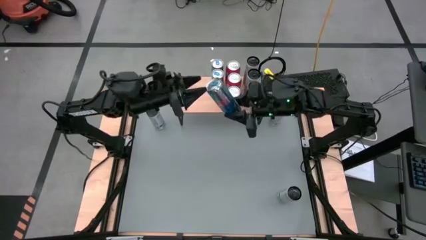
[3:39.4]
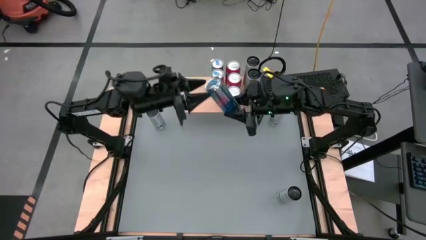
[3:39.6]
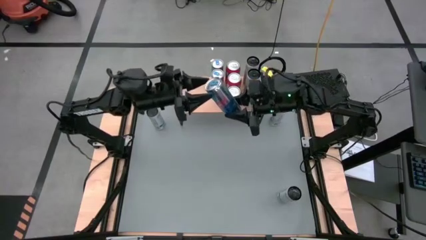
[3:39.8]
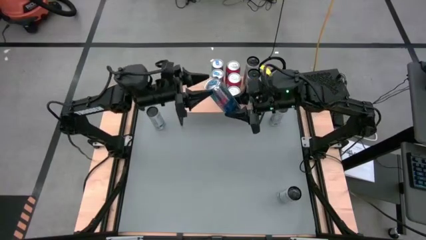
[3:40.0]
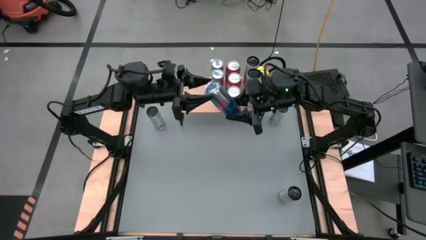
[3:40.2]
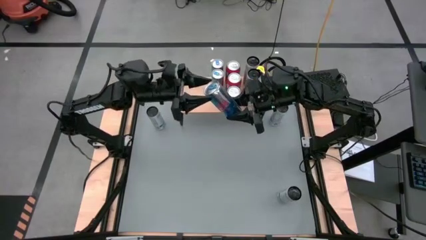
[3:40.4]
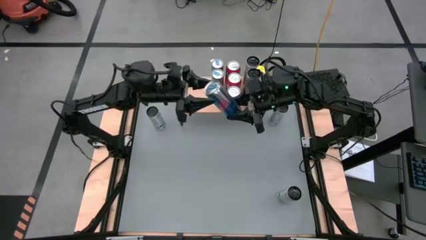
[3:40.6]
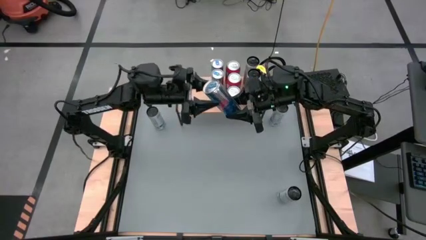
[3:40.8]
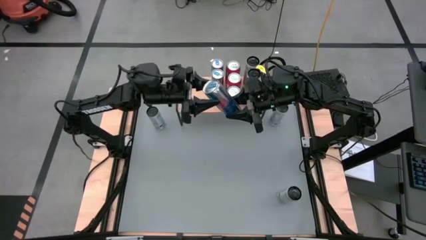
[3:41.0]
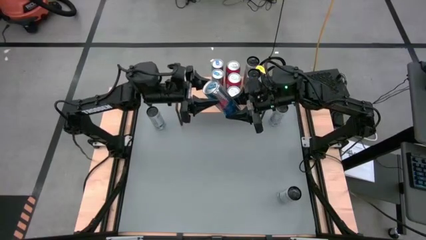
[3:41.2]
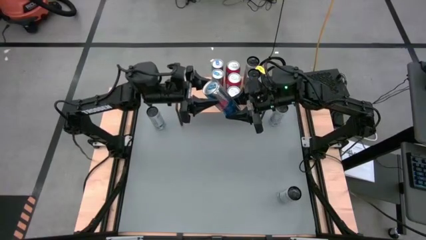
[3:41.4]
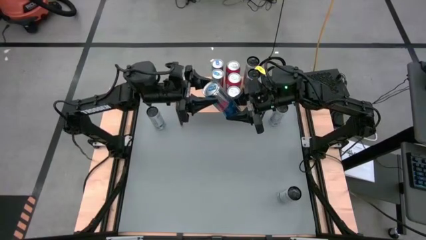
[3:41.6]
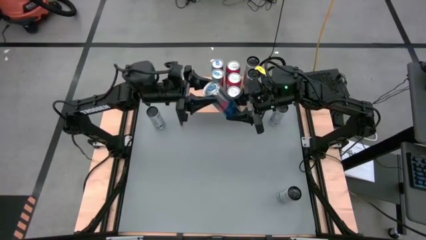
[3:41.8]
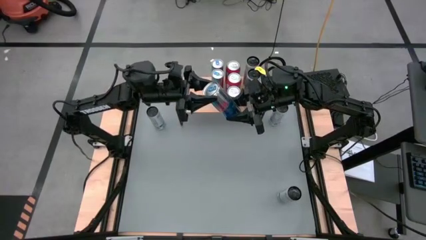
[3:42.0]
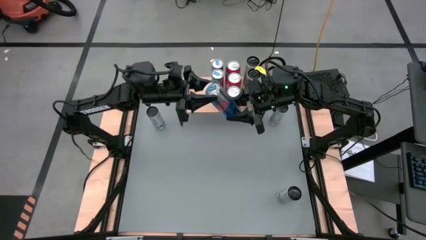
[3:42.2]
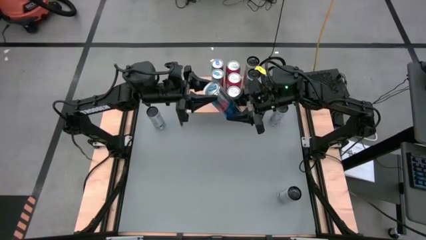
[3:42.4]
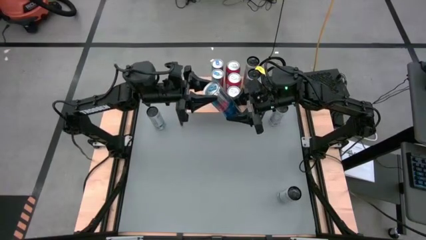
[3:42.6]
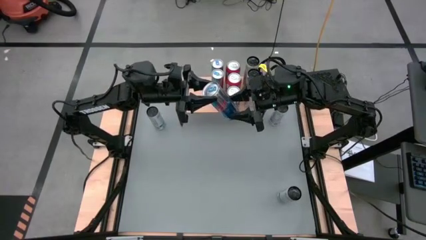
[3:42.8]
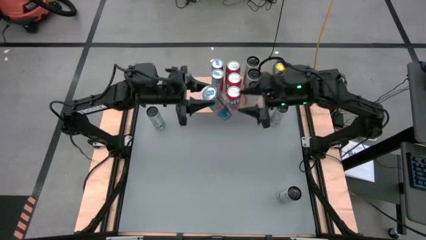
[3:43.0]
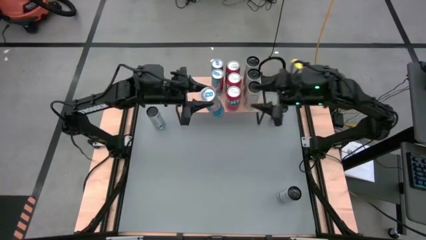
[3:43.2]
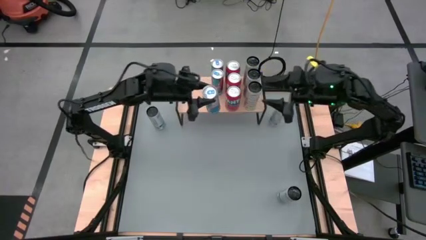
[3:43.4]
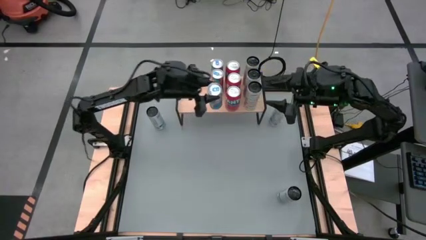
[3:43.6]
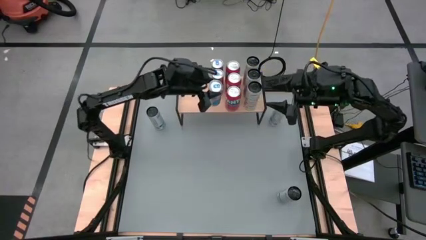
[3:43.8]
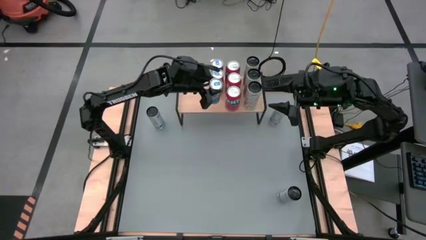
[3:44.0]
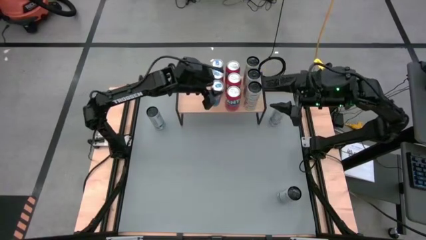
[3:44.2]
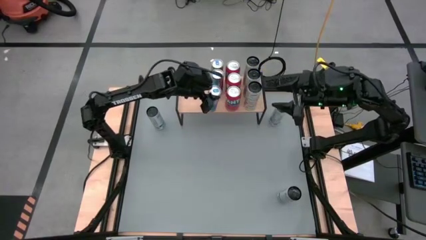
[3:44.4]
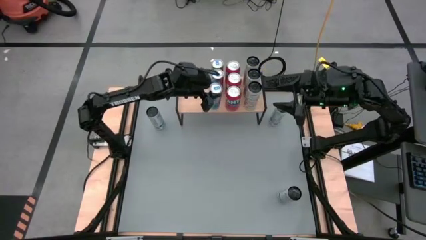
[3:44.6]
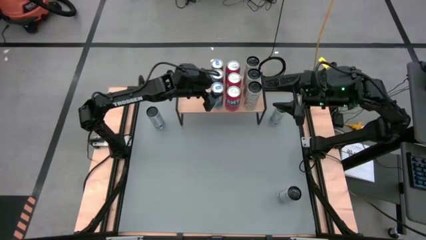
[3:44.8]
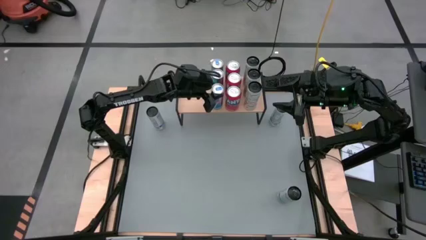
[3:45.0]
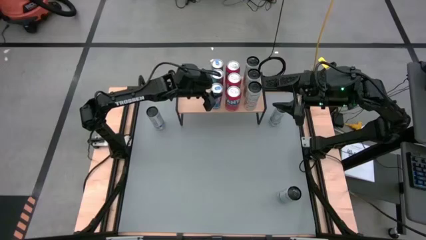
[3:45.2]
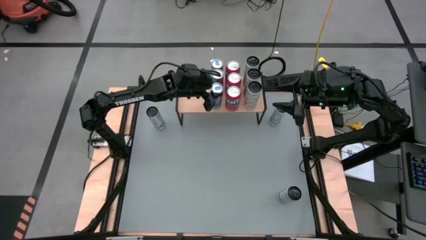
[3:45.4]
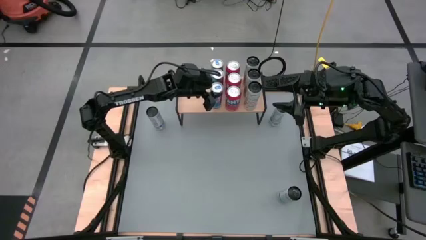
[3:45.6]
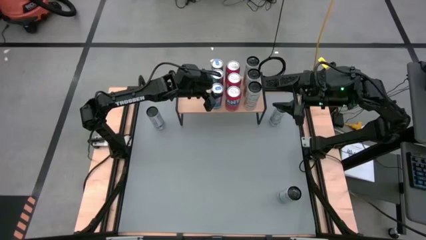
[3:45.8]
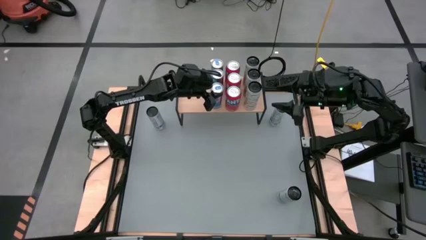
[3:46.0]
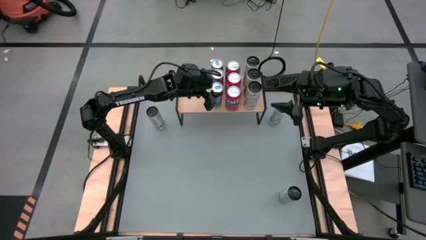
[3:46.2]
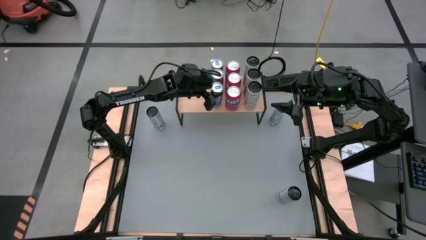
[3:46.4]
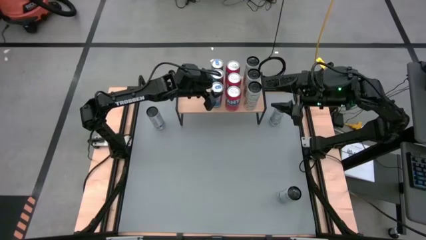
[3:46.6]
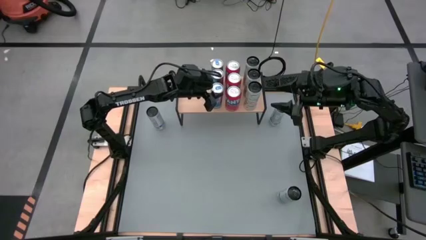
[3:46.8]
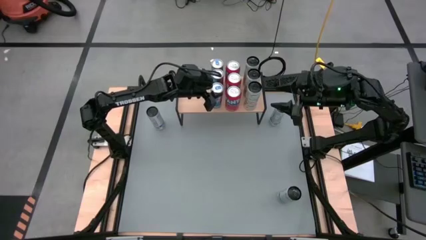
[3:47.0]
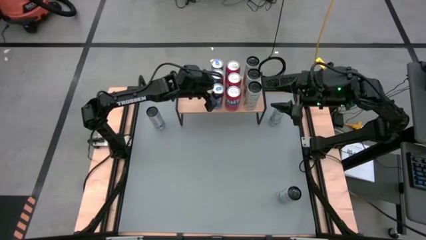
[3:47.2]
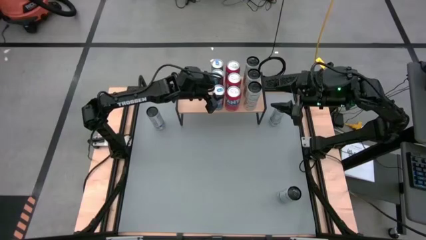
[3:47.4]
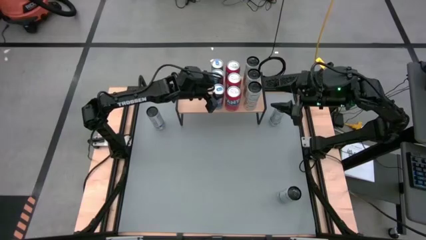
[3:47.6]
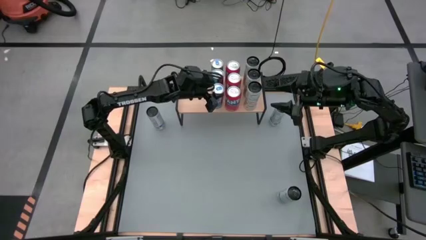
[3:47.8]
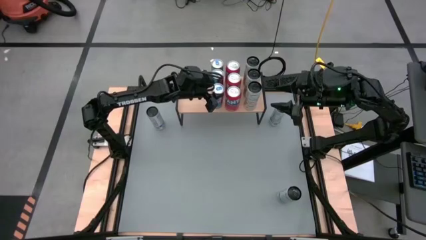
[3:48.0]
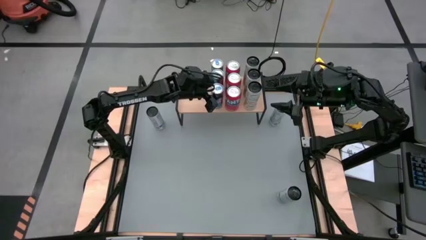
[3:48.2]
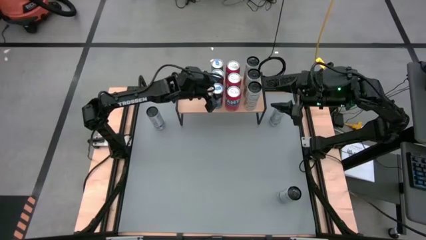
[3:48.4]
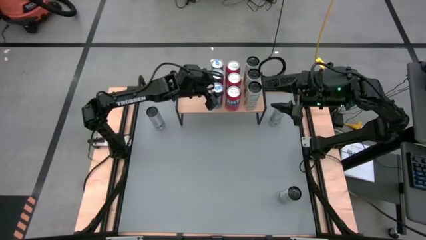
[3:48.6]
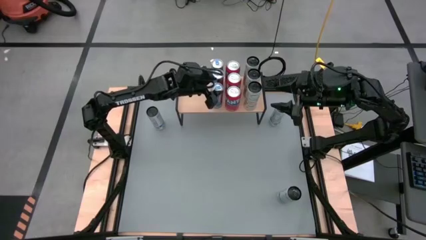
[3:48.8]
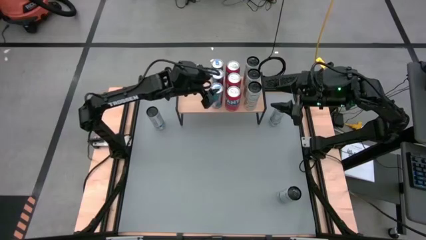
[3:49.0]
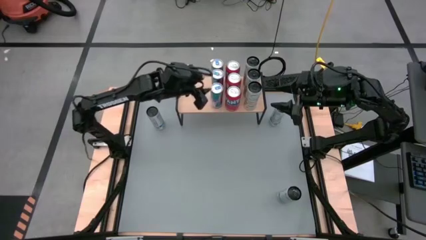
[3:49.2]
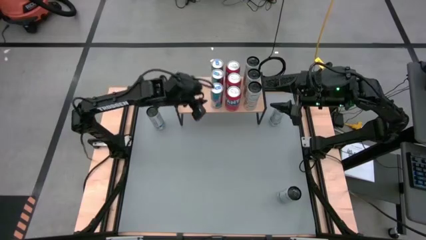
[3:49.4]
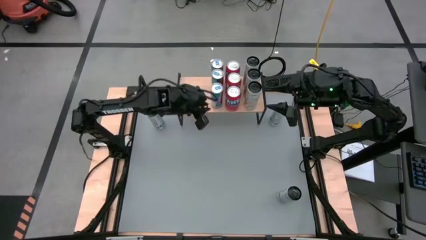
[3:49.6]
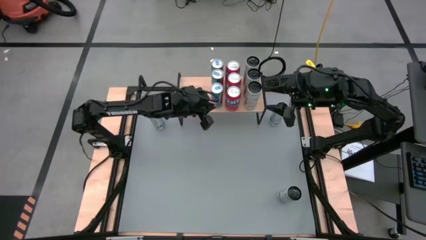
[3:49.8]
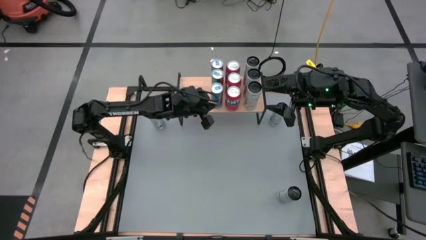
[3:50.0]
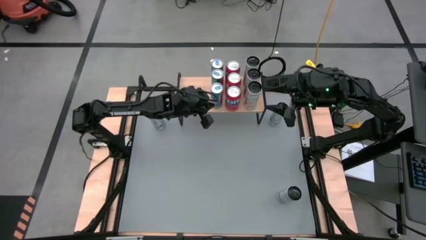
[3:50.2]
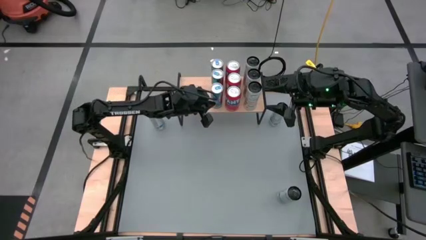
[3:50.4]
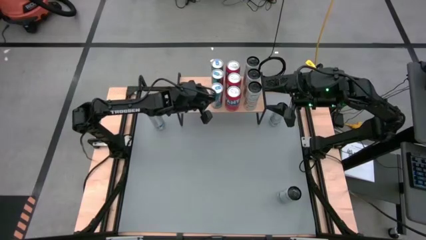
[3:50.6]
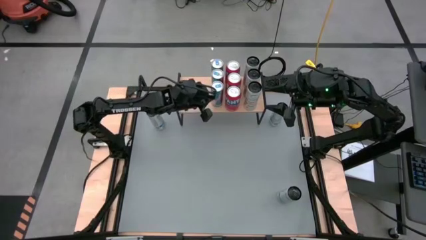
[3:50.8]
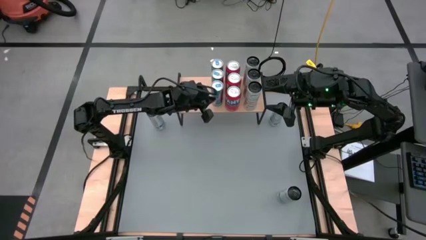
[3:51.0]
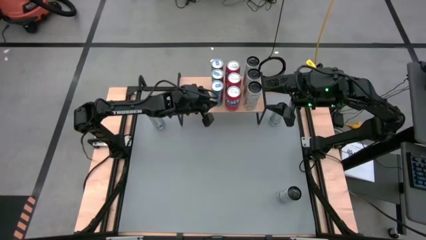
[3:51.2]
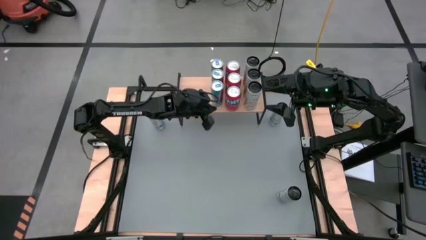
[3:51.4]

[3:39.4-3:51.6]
Task: Place canned beverage on shelf
Put the blue can on the shelf aligned with the other blue can

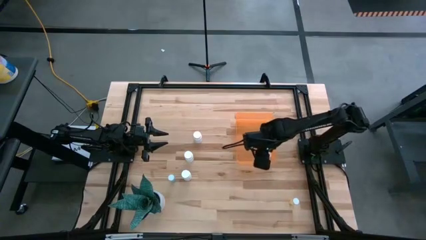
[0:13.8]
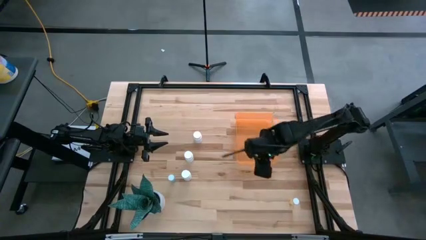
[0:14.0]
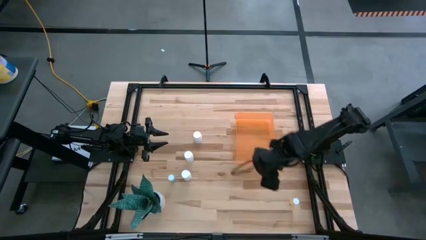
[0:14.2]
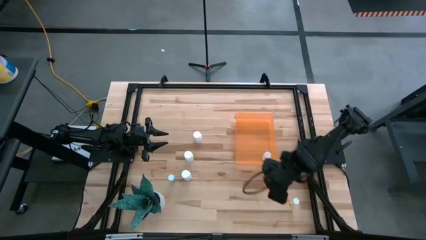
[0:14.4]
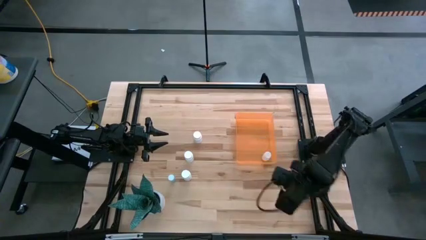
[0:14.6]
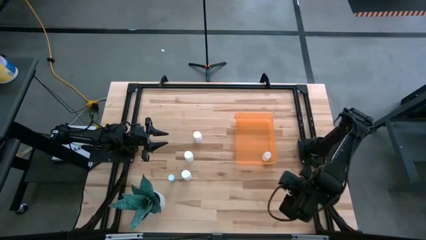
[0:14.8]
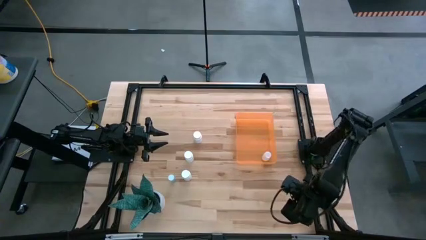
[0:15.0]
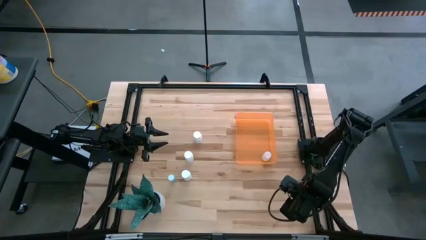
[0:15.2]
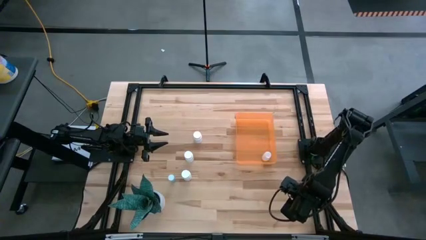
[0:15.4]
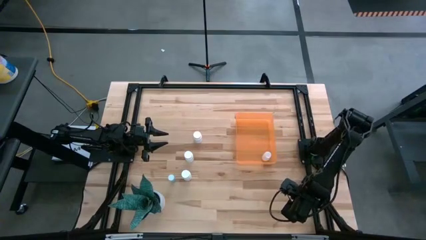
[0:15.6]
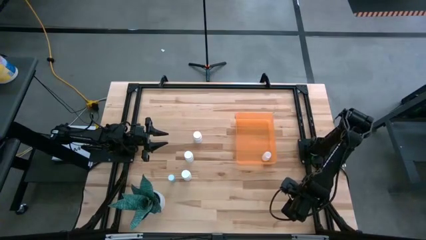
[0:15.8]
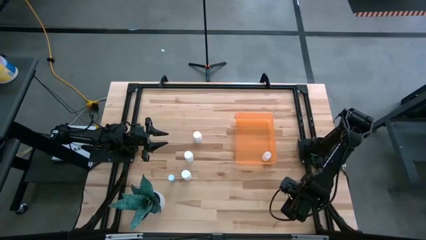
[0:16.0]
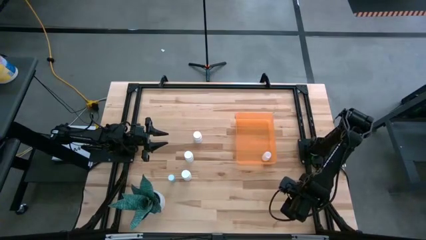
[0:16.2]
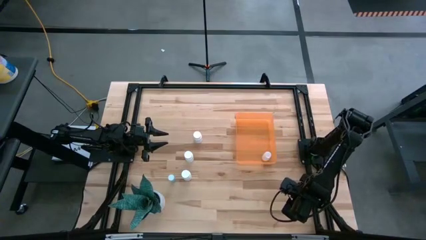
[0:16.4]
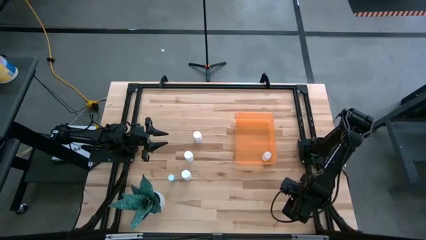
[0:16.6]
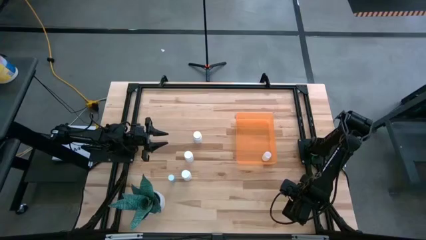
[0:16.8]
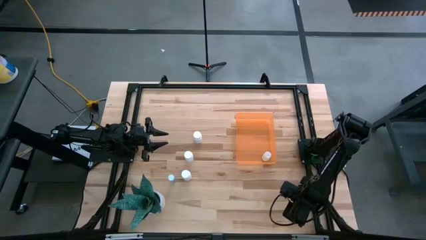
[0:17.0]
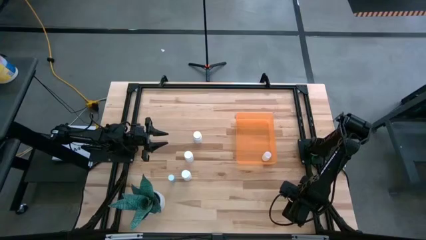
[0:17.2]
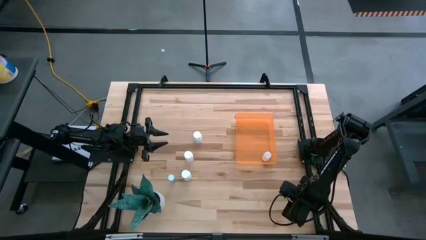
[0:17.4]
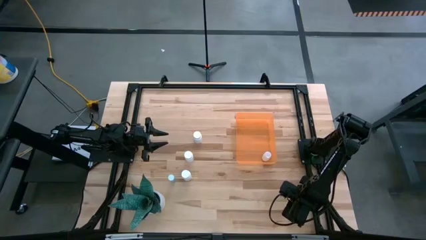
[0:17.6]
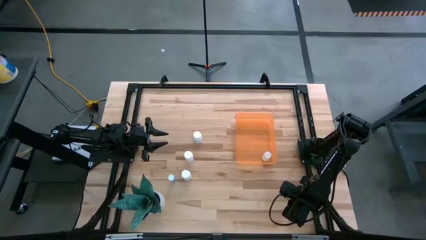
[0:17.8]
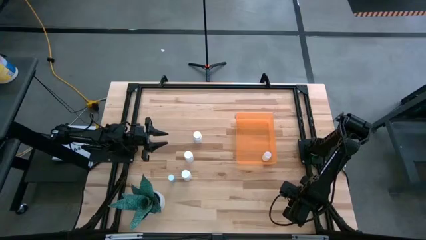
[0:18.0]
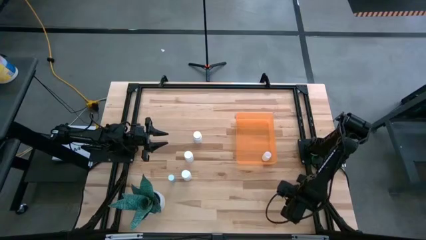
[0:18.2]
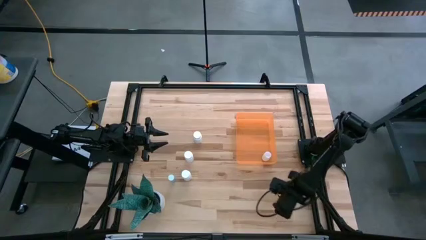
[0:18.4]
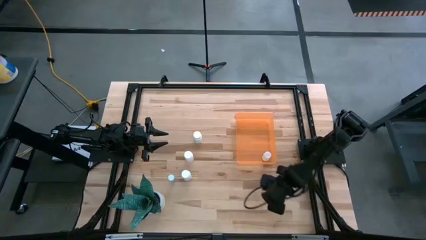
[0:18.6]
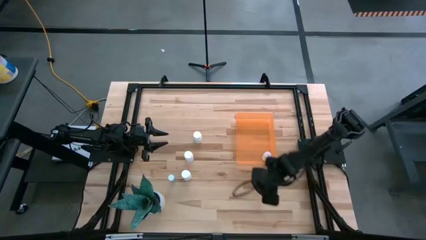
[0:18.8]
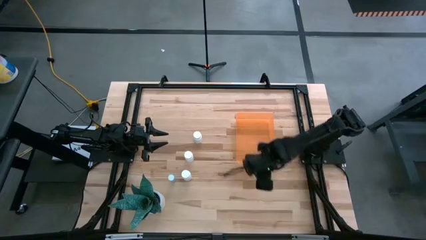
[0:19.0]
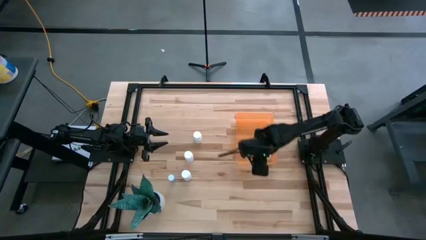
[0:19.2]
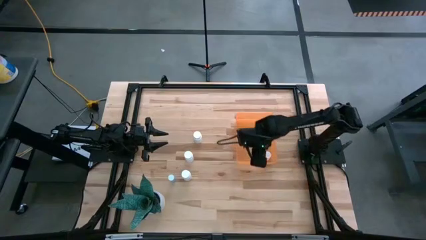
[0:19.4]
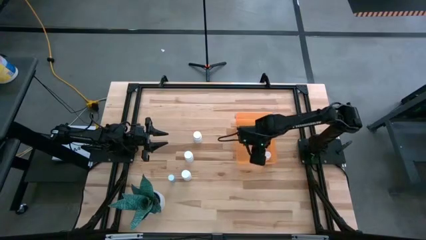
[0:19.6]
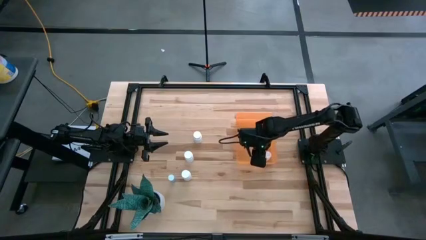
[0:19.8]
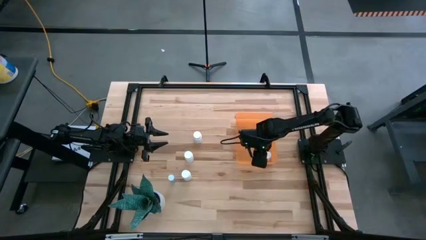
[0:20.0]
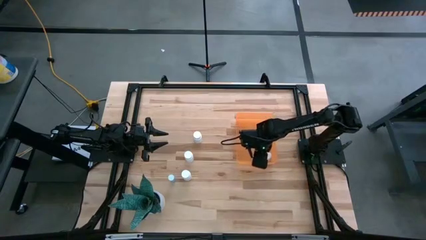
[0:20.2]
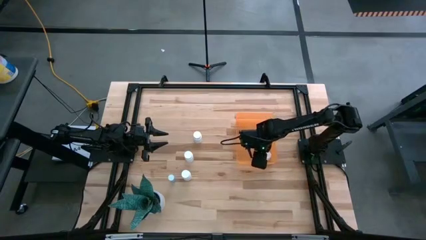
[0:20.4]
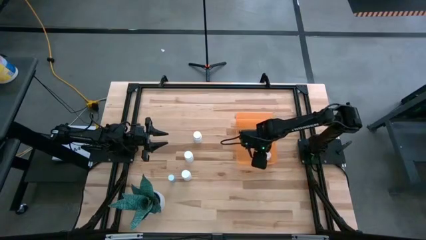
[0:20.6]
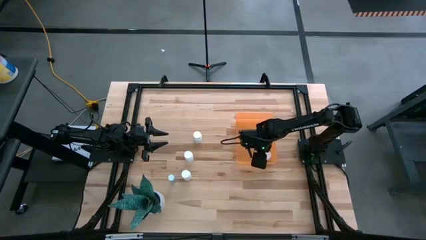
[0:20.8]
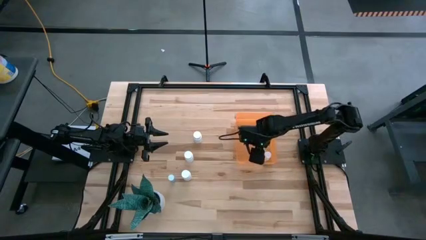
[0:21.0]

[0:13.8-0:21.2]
Task: Pick and place pill bottles into a basket
Put the yellow pill bottle into the orange container
